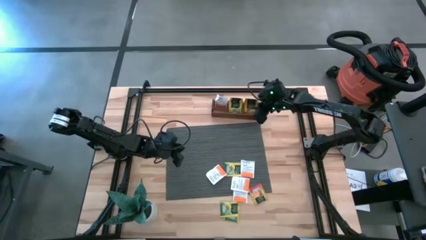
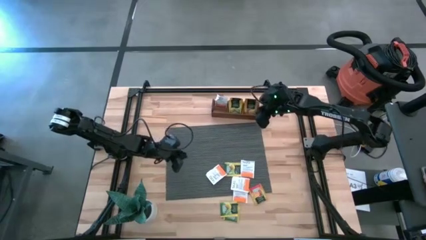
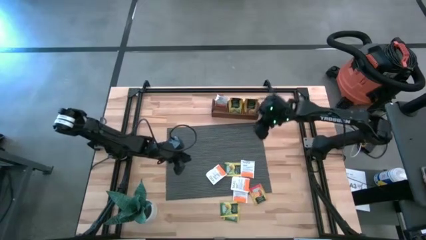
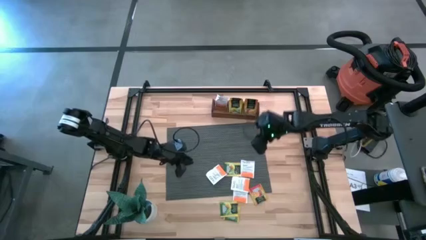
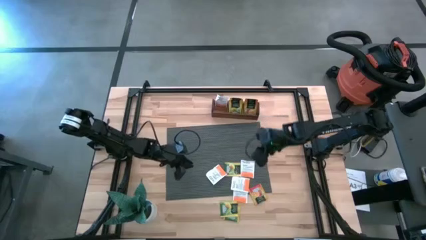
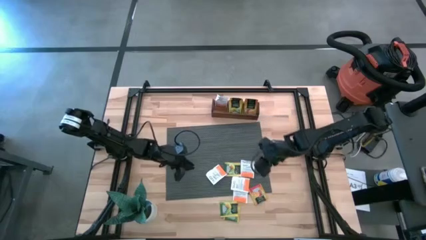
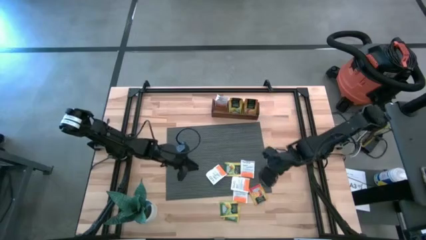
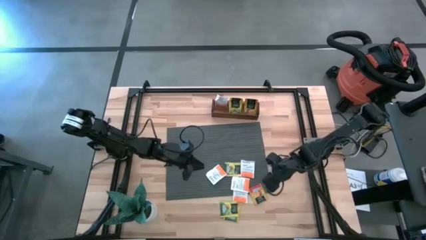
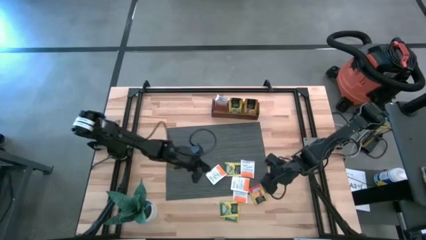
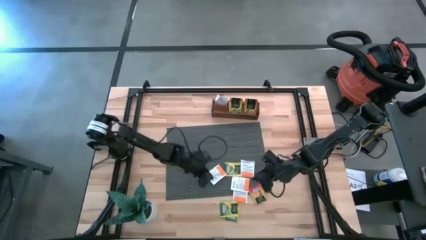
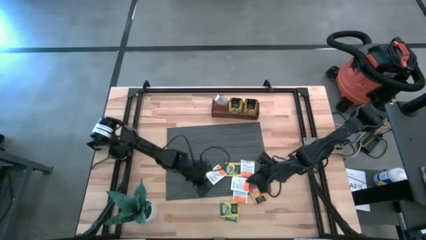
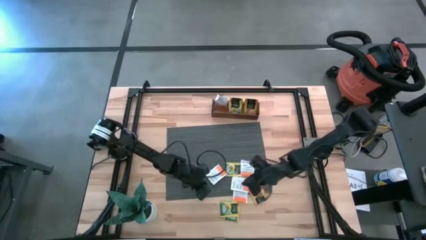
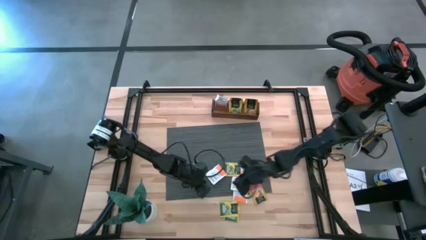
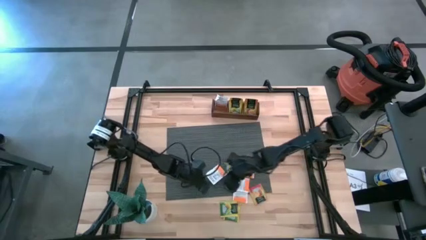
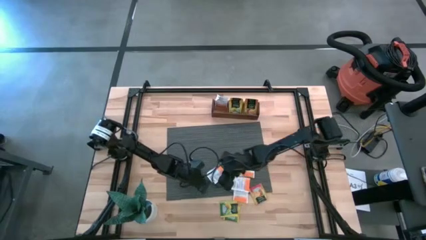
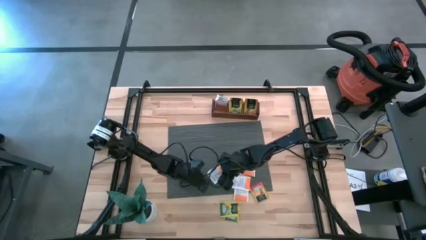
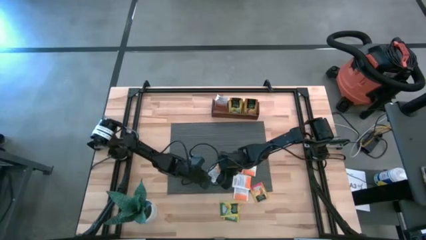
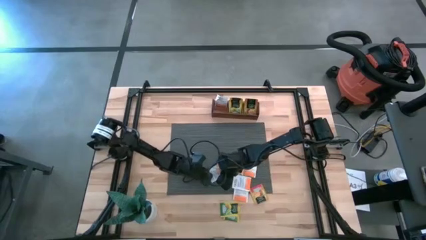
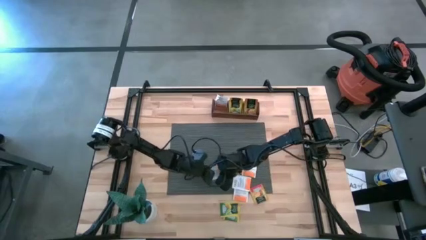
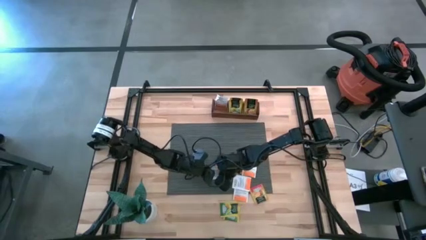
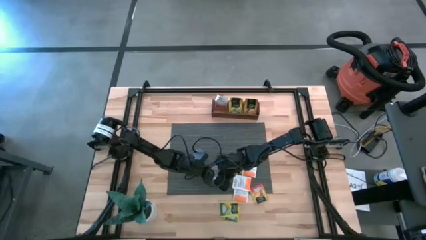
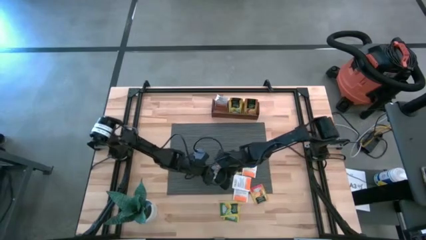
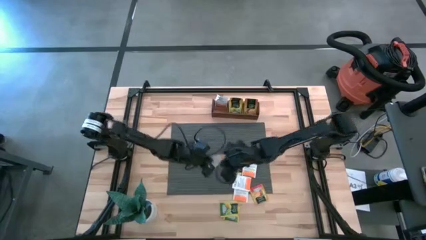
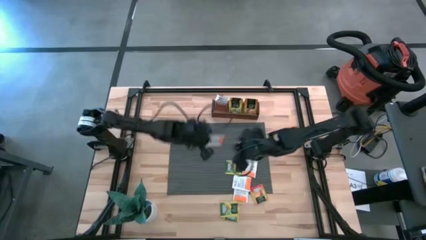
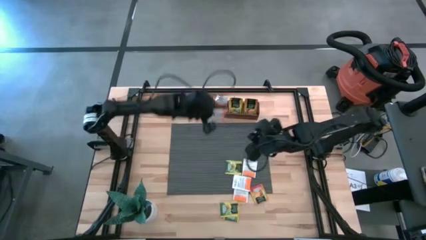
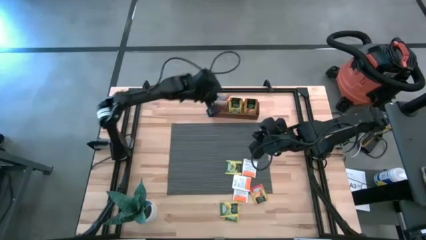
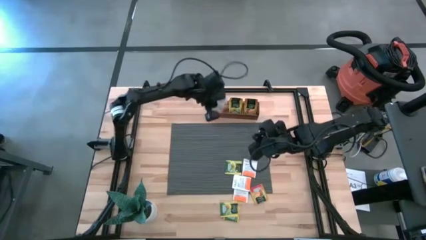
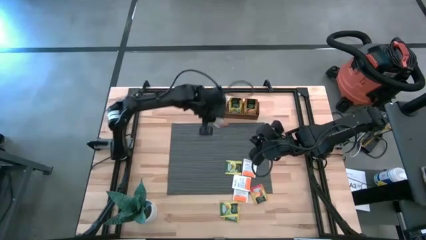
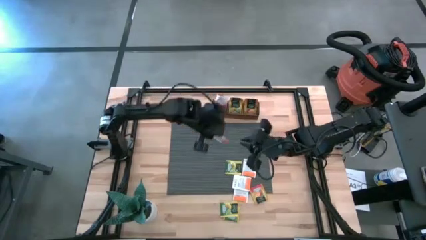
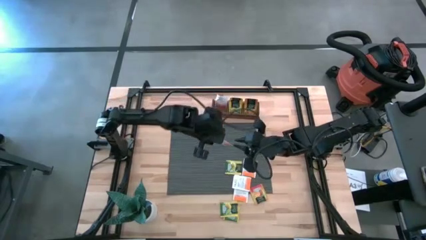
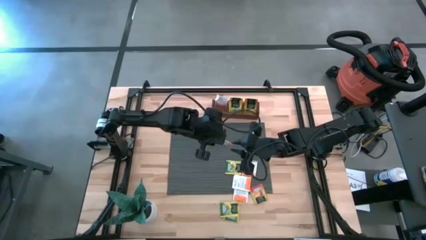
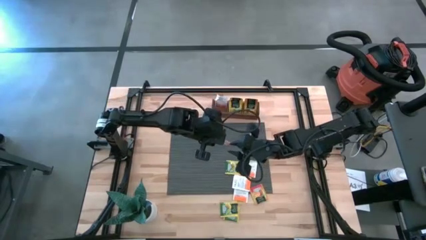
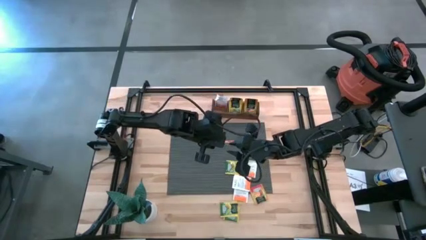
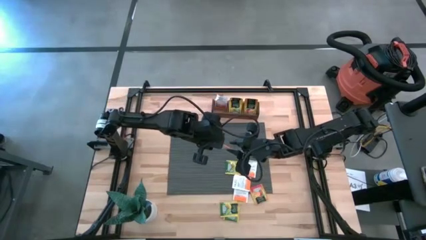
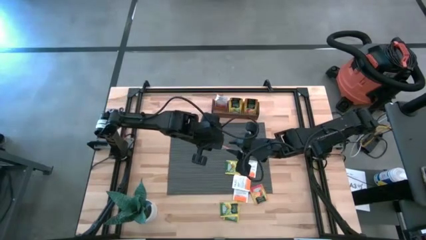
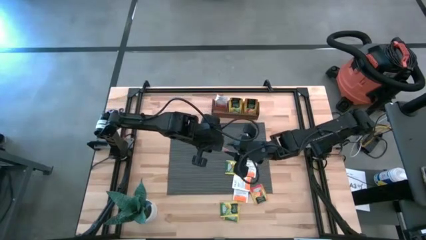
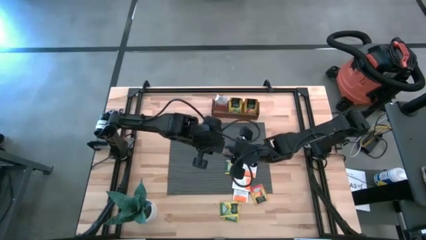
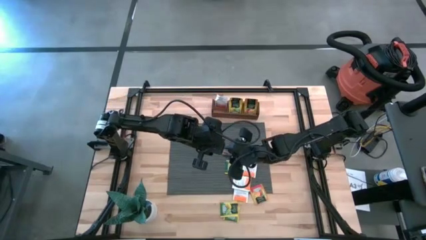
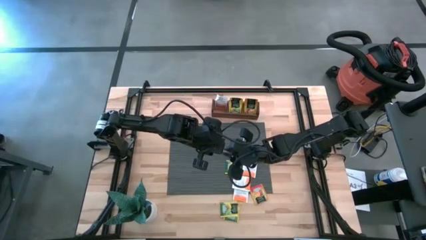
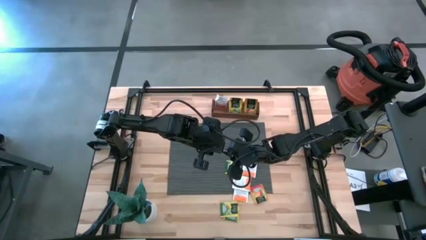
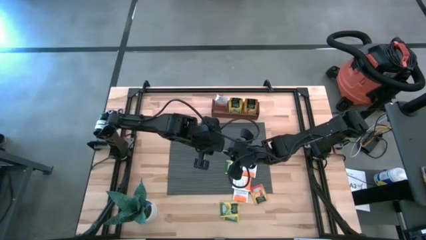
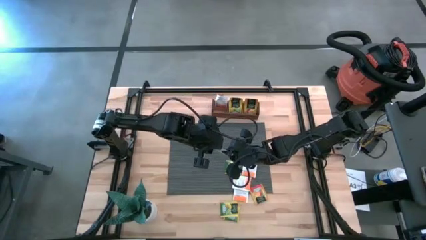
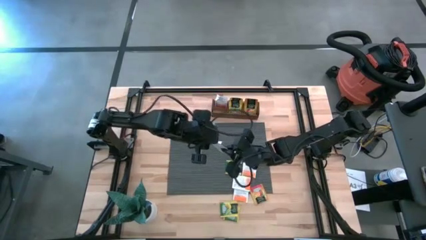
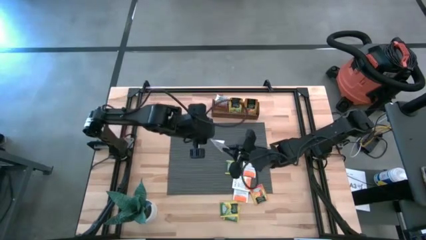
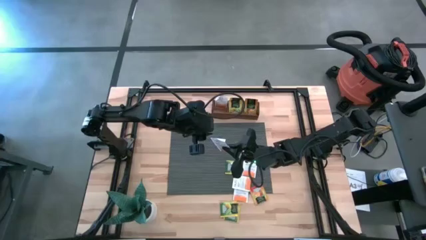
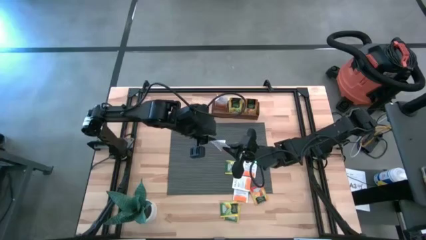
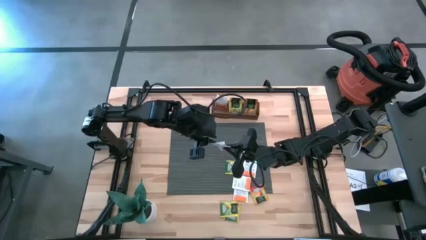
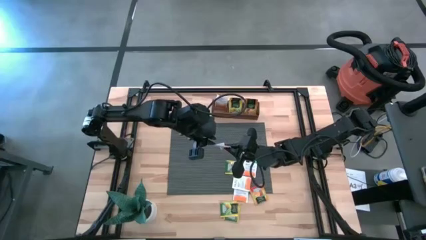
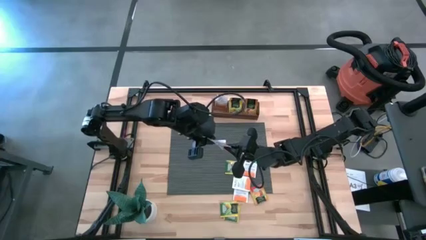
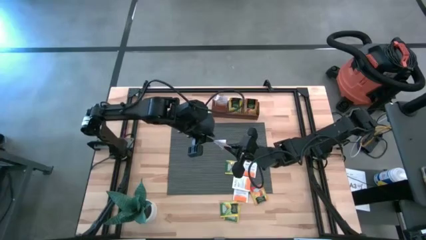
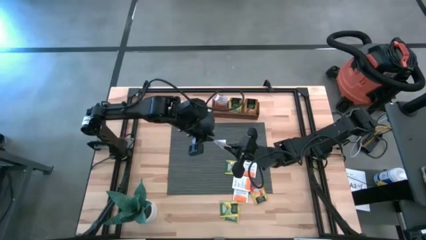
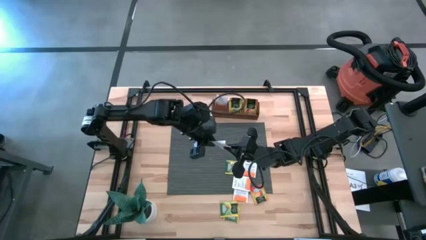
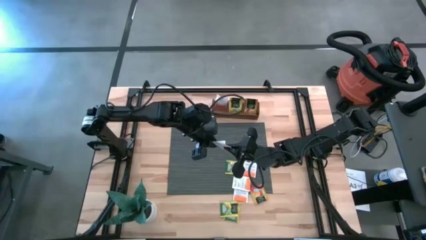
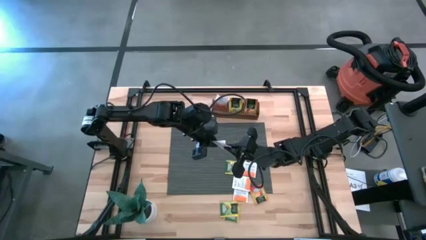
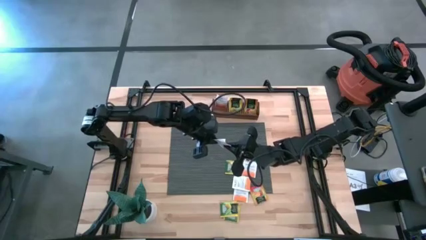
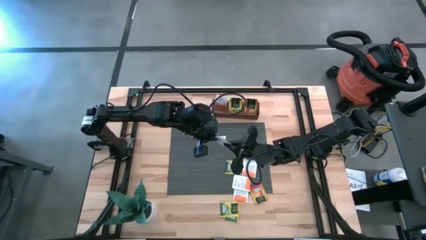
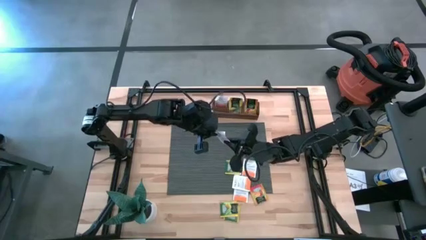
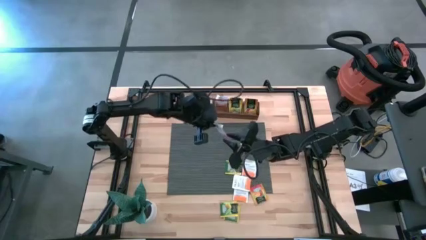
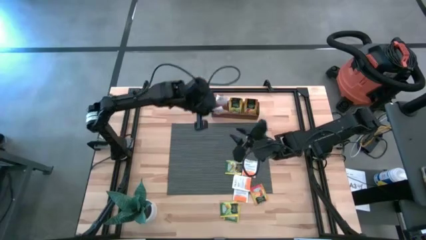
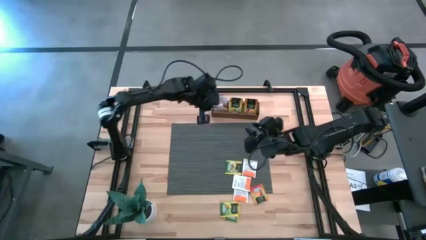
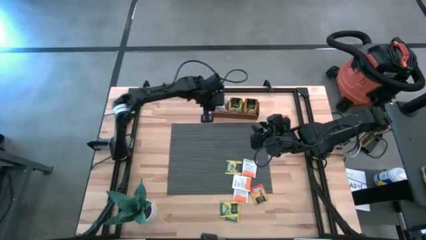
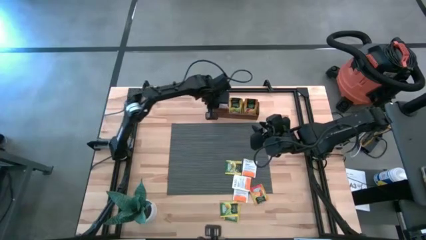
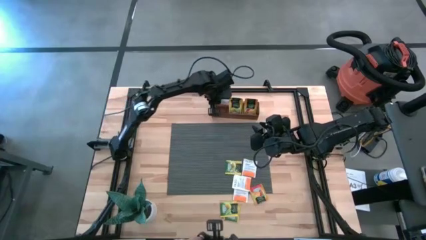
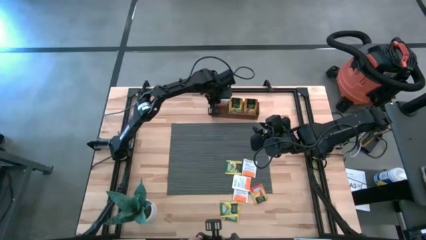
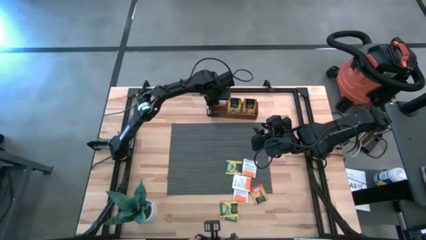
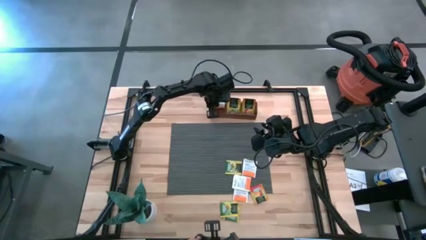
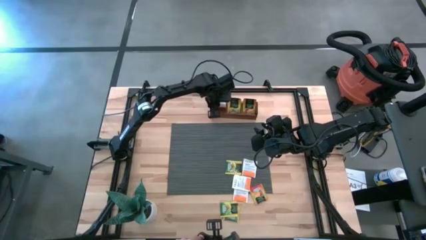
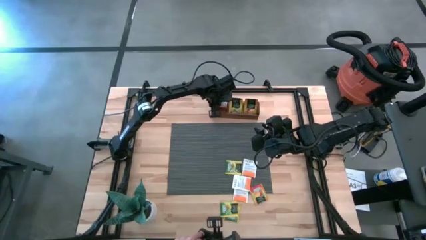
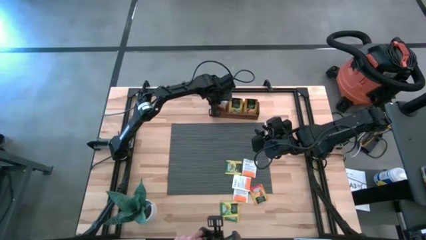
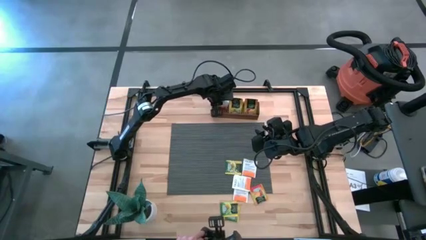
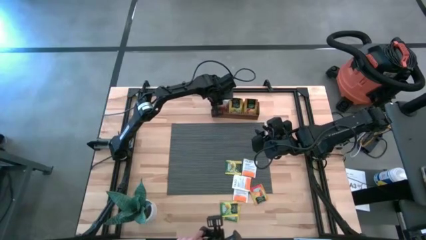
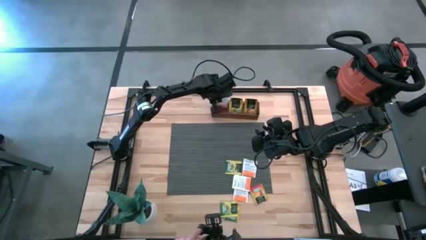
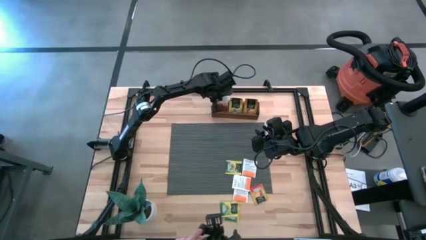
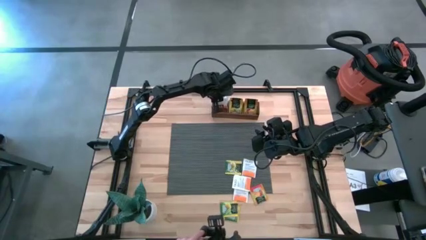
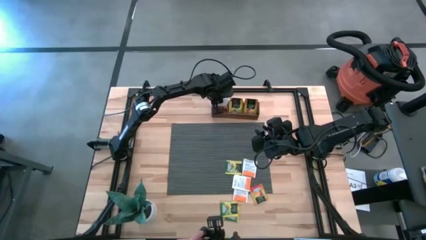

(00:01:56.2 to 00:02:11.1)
Task: Pick & Place Tea
Put the white tea bag into the left section of the wooden organizer

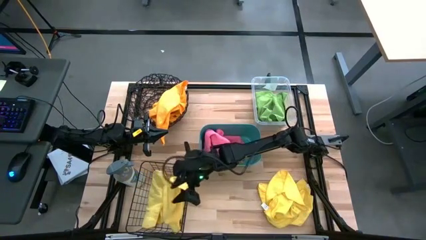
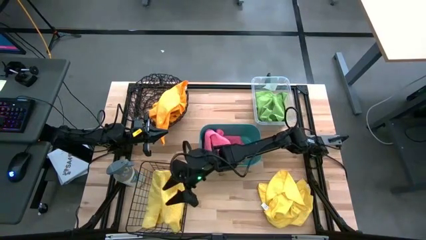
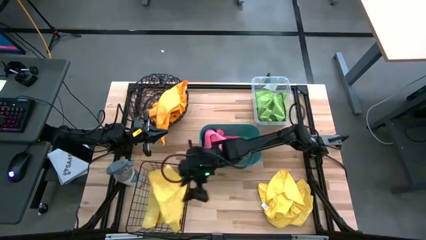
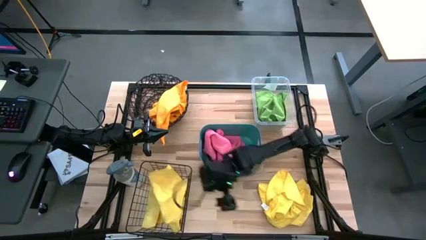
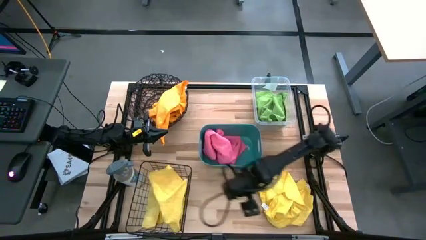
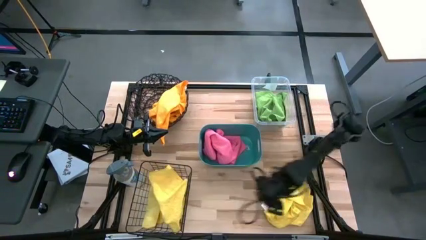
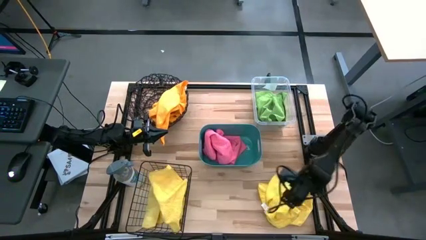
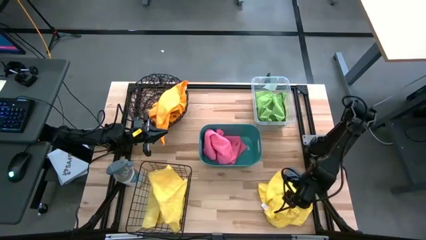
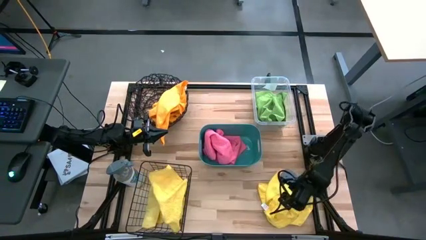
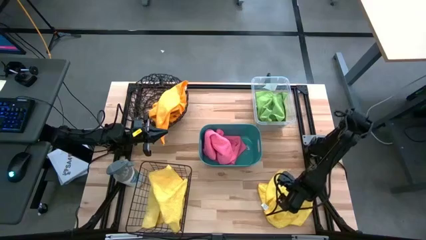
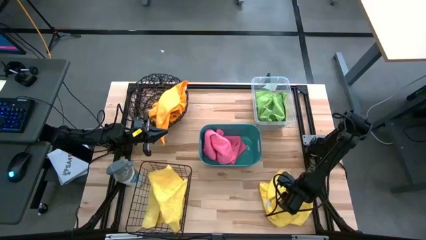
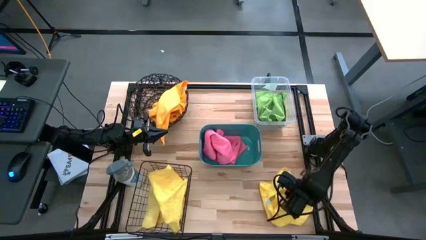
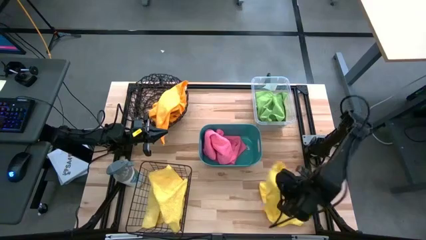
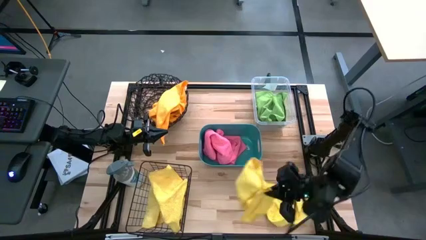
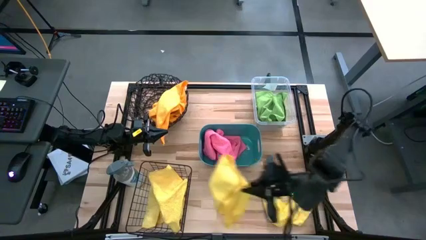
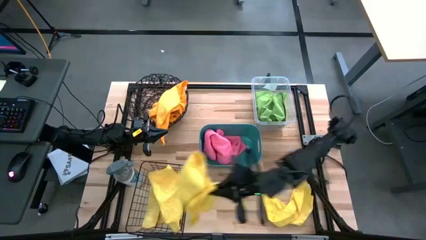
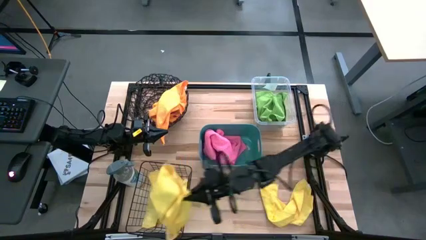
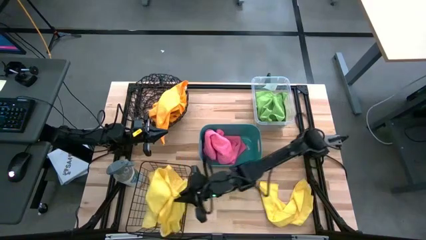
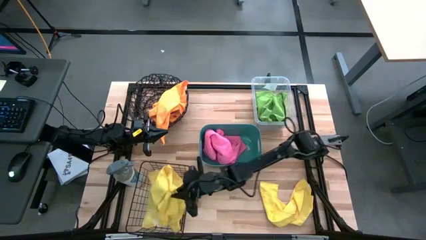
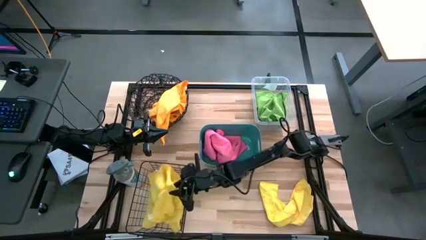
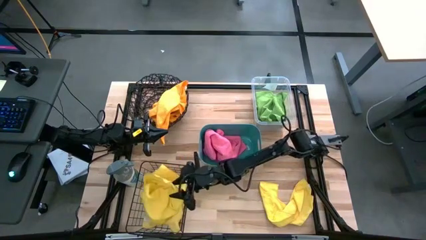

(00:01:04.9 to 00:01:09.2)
Task: Sort microfiber towel by color & place in baskets
Put the yellow microfiber cloth into the bottom black wire basket
